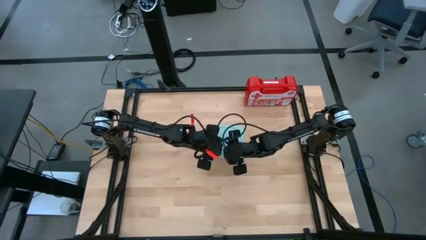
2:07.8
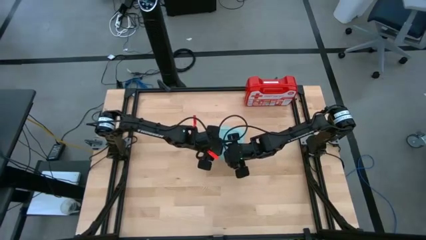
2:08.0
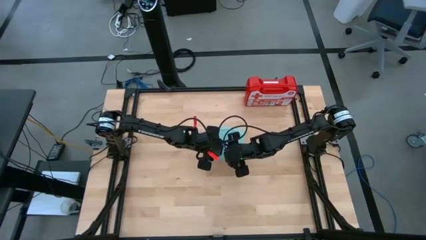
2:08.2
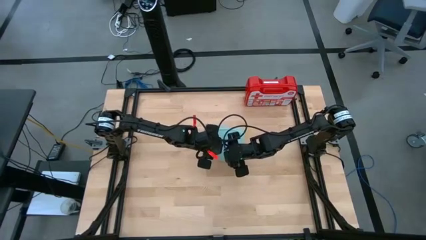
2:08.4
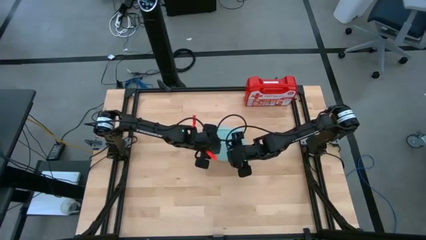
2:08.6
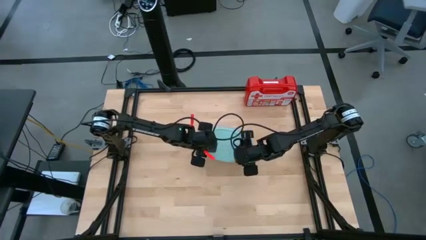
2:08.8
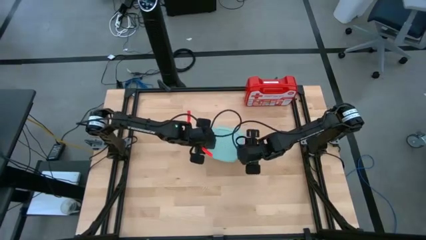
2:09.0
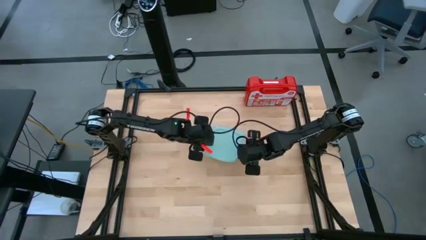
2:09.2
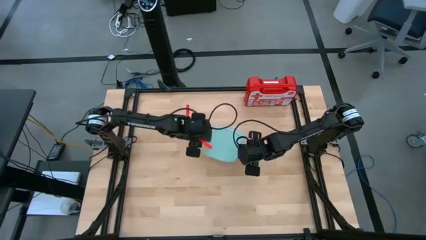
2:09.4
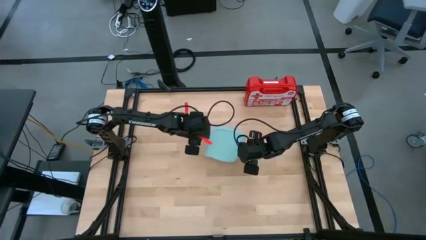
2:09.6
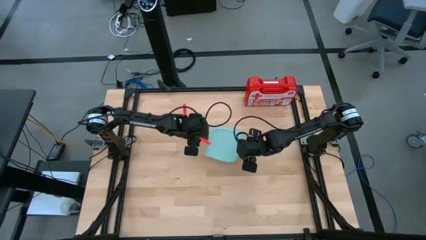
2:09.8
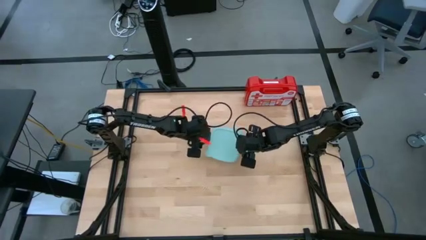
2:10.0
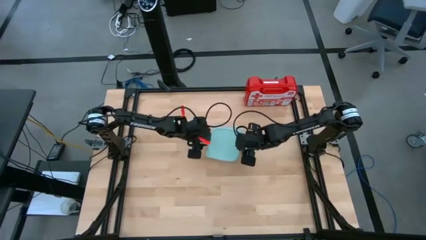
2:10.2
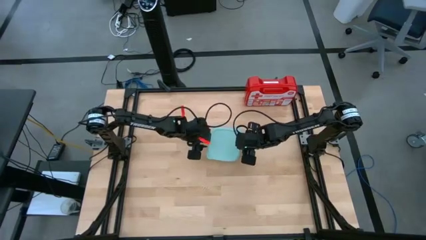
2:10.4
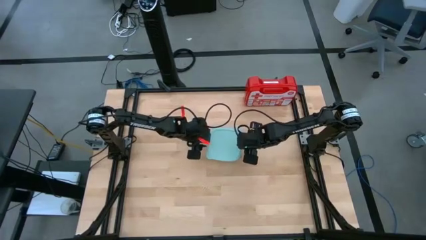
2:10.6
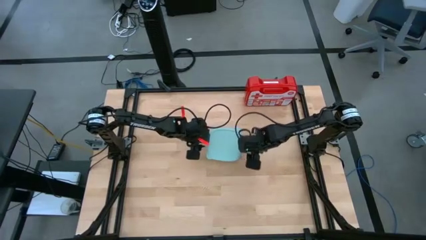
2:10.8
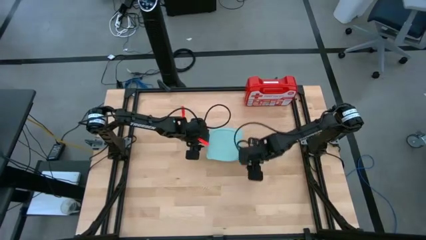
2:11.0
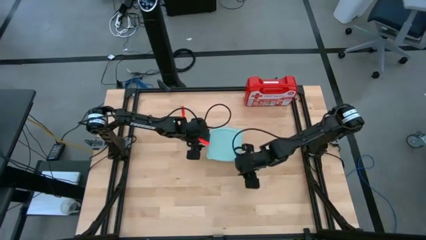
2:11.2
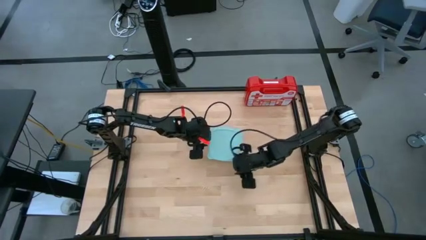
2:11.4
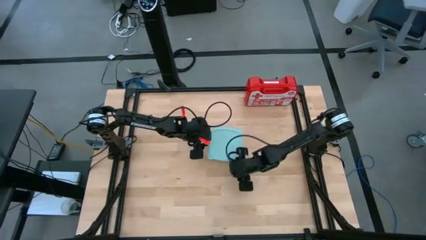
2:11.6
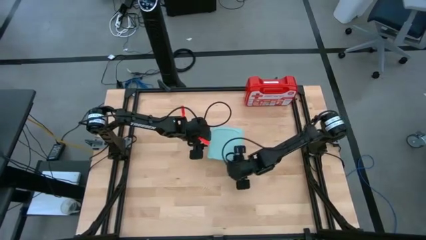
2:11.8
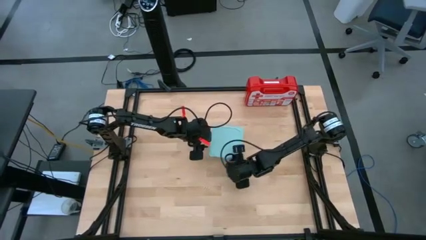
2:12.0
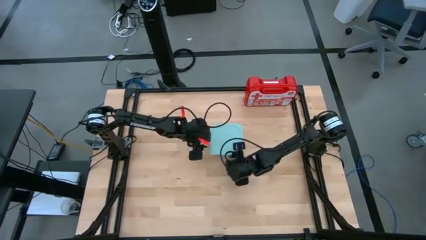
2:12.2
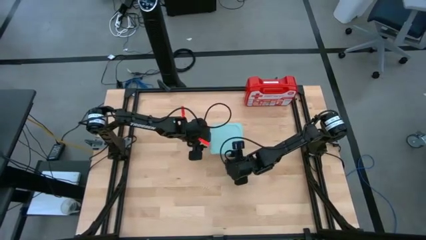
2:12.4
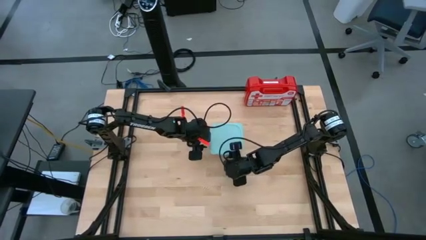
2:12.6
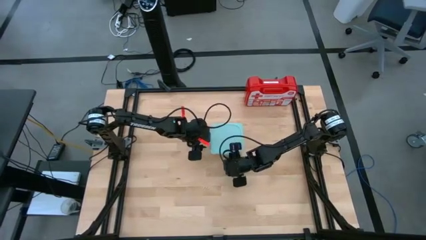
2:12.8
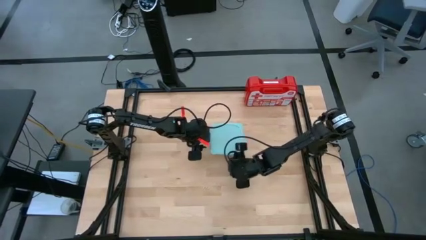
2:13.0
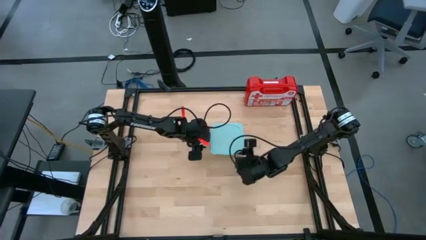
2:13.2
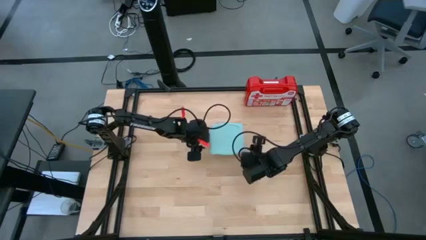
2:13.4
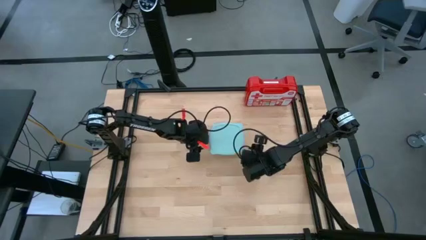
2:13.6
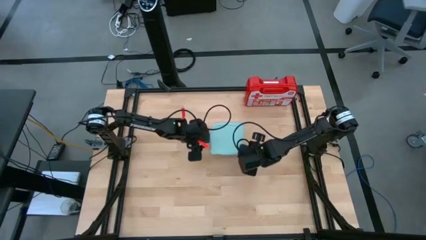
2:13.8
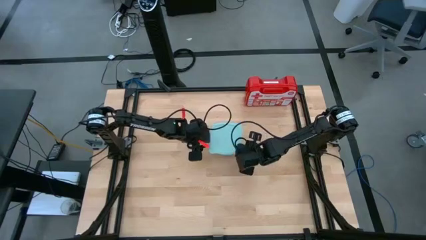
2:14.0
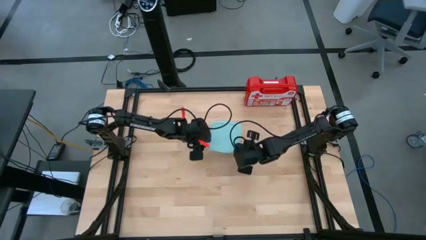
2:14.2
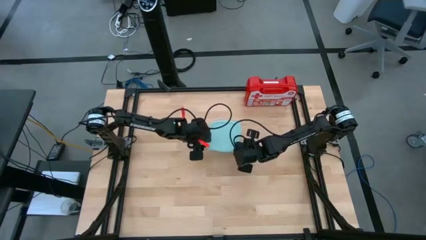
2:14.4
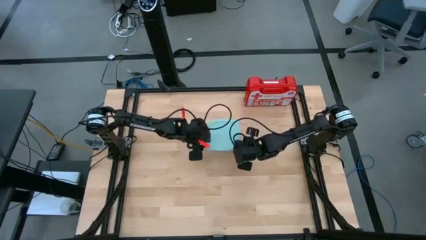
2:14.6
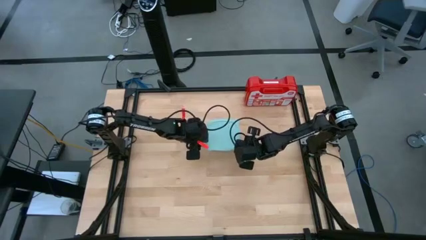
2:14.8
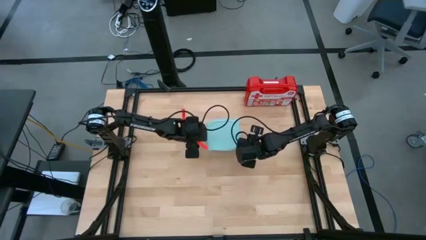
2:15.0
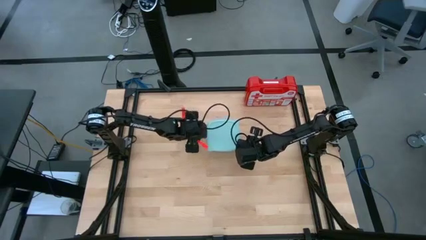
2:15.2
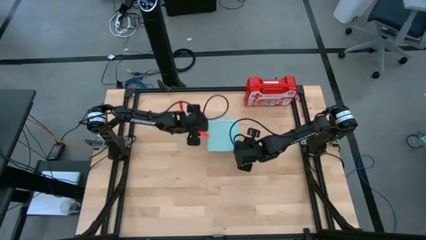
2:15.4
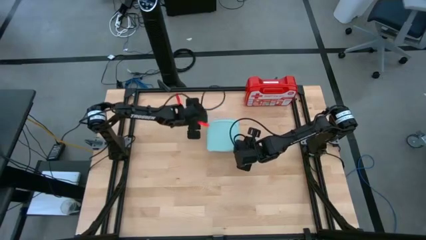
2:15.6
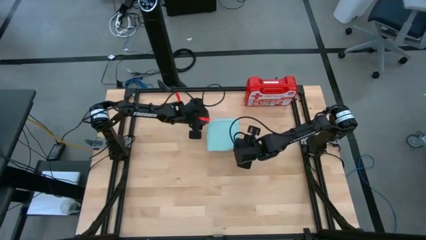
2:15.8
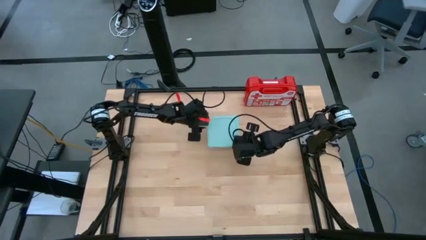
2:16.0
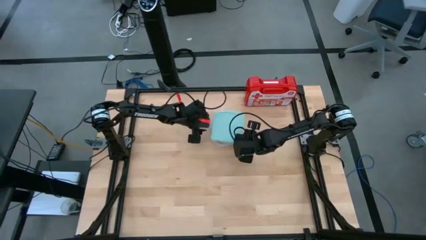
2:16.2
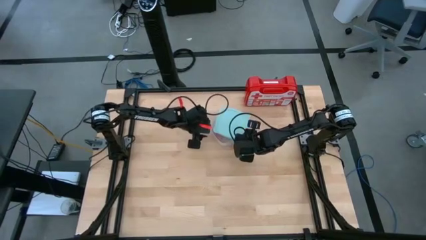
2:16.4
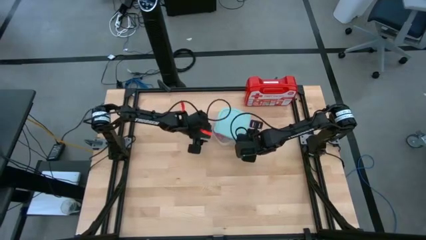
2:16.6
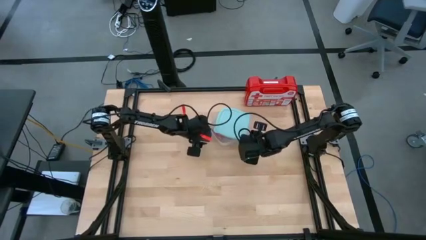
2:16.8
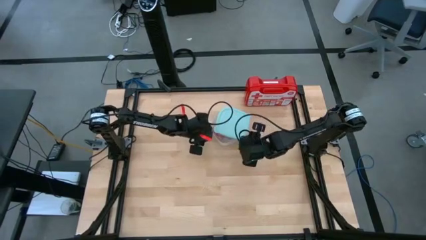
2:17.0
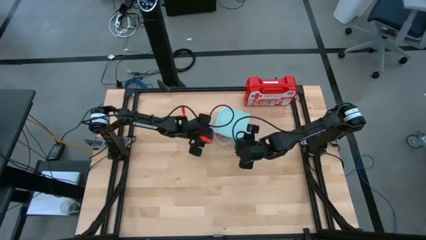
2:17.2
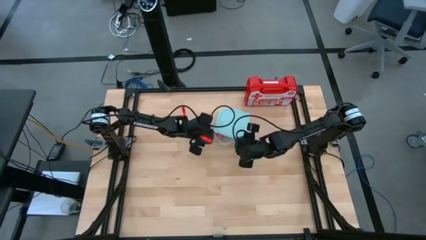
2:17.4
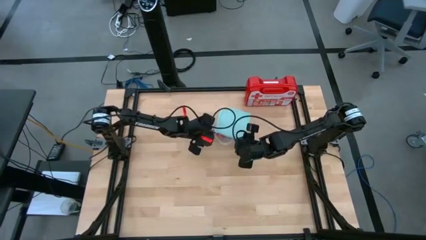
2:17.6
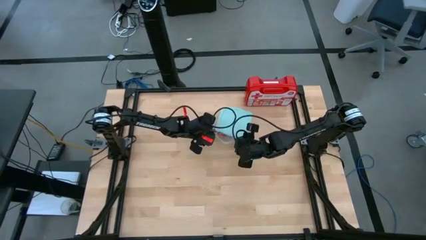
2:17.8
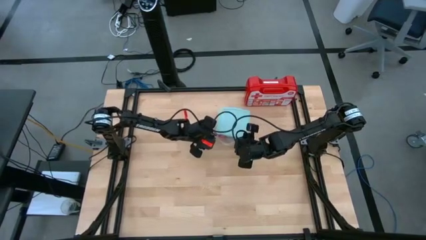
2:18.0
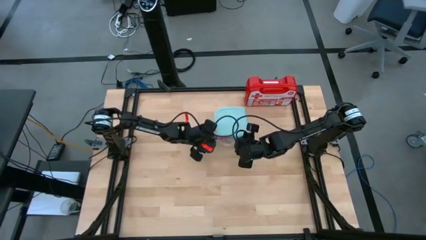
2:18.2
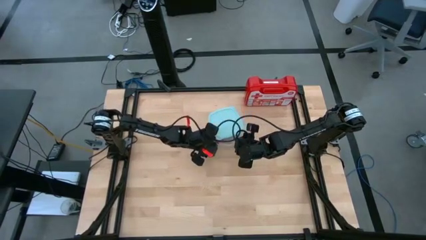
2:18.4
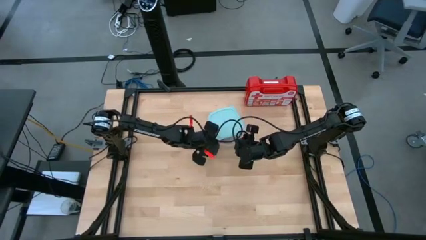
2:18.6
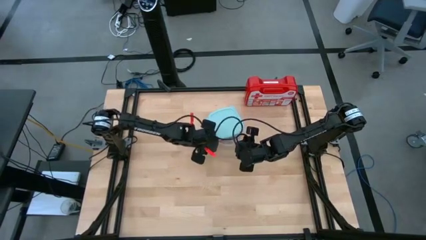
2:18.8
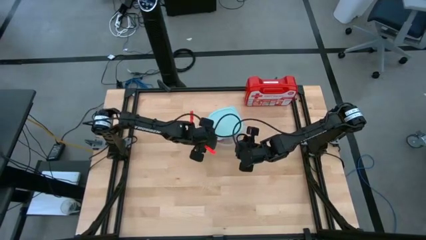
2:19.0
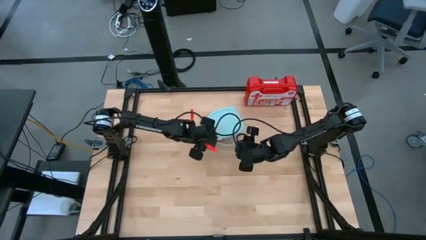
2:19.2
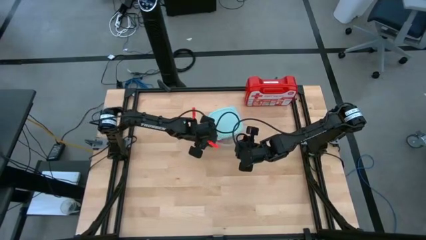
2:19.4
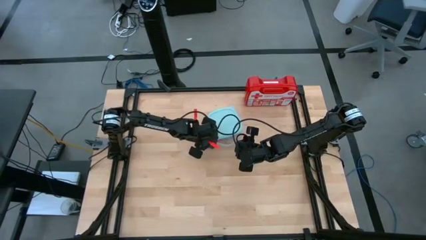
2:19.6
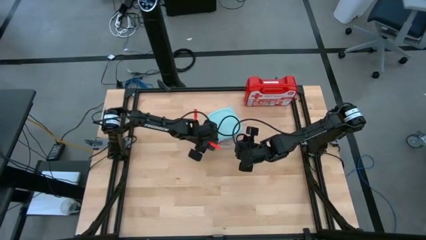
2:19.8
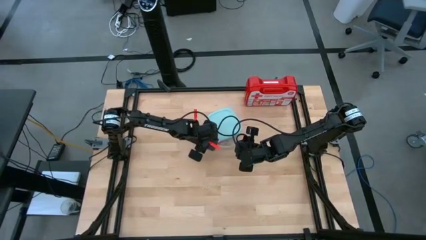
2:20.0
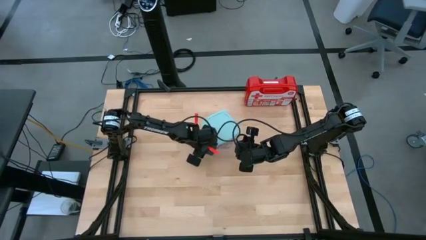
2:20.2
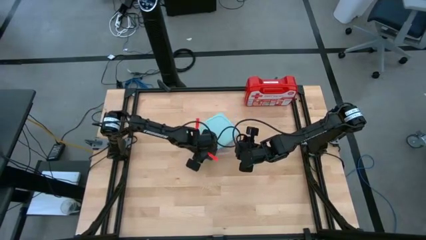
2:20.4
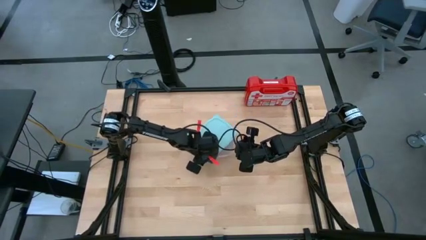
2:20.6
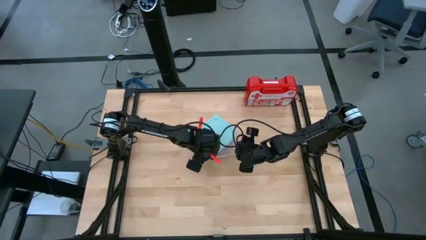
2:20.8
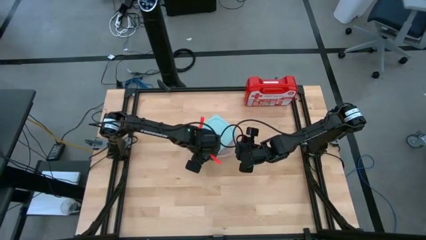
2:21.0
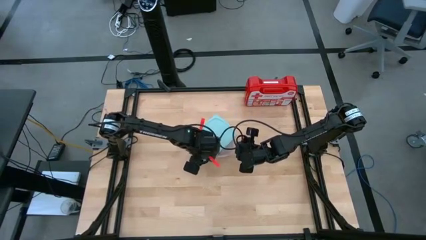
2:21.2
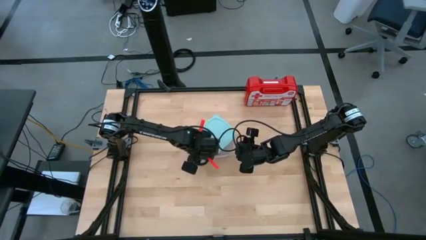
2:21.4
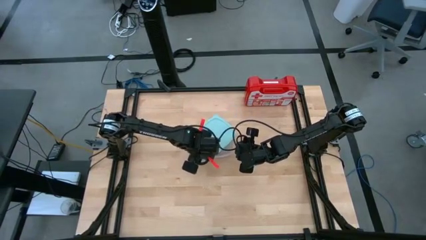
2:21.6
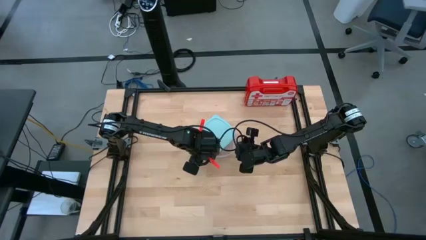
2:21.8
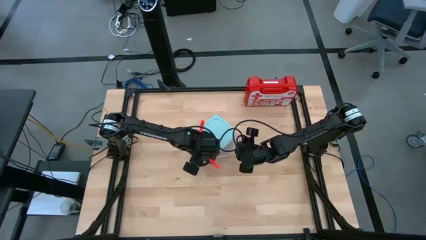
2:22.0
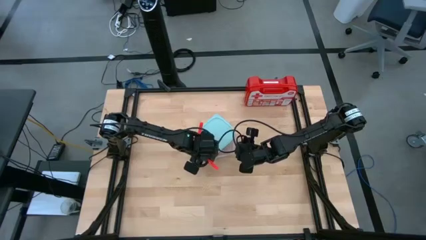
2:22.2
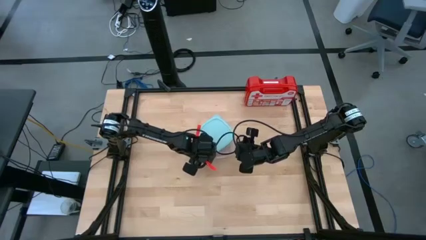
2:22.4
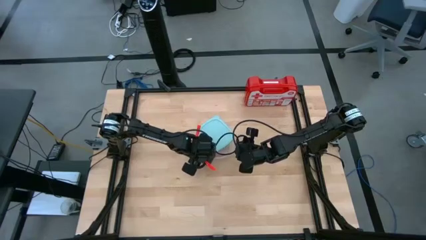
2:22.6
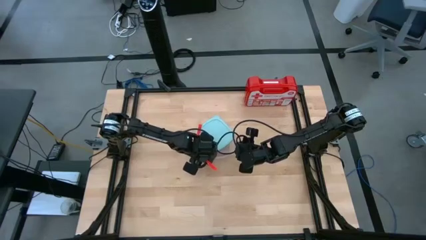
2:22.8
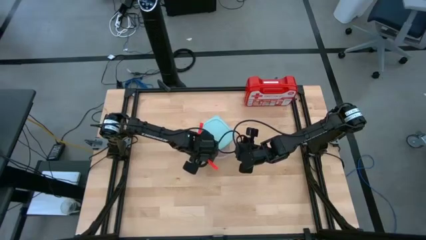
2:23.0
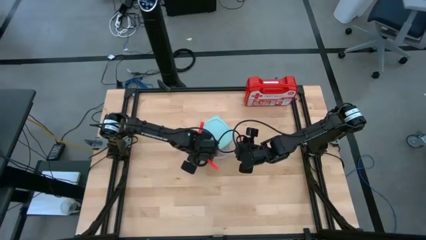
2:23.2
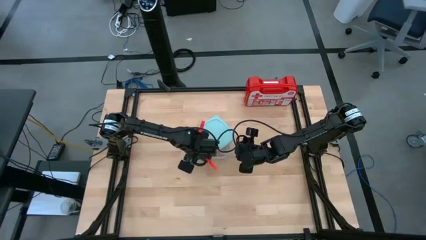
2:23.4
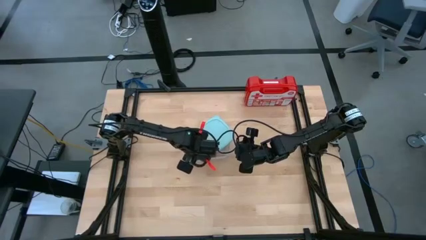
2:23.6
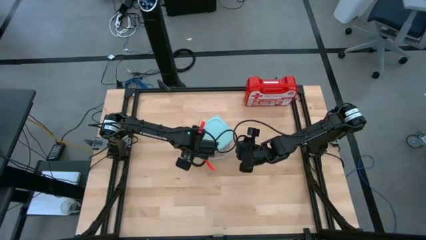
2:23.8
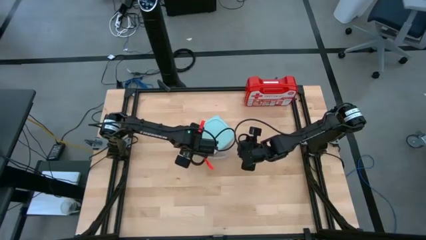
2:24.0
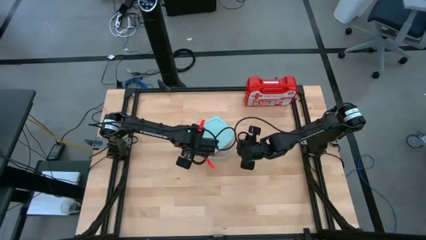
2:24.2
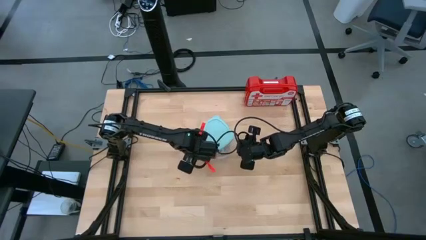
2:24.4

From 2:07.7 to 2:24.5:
Task: Roll bandage
Close the plastic container
